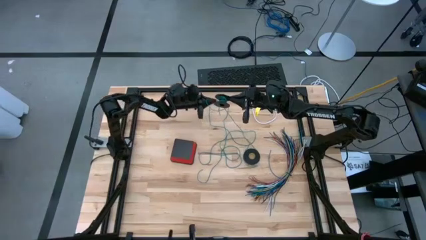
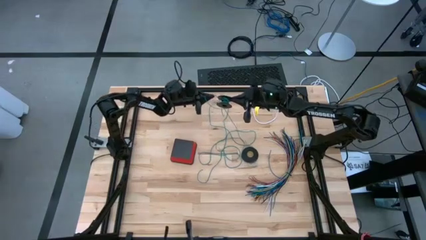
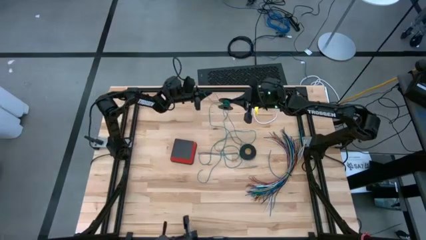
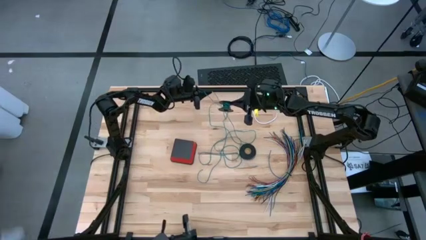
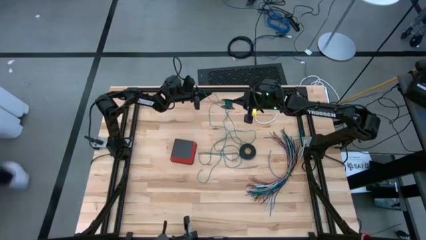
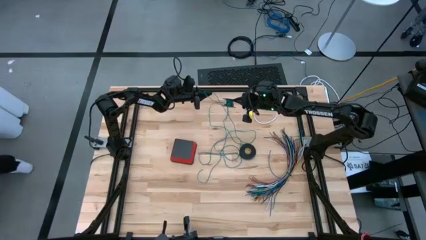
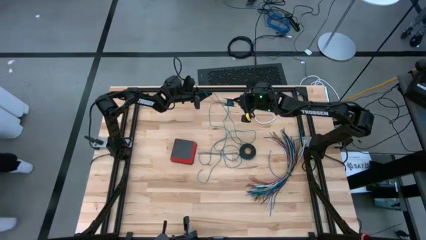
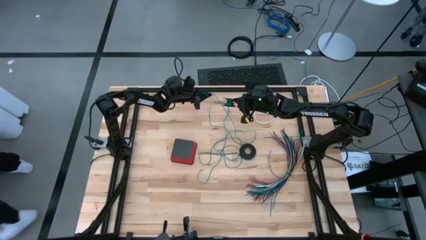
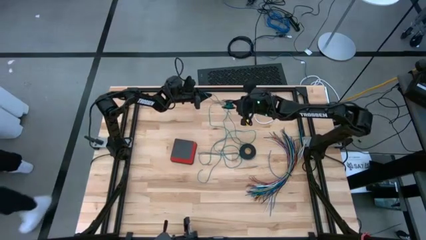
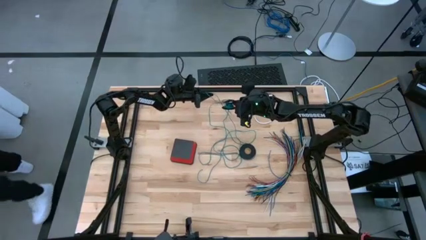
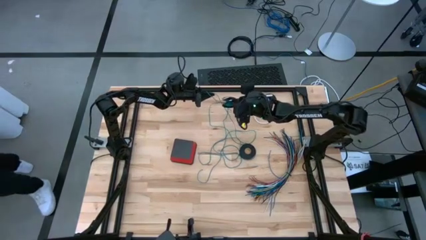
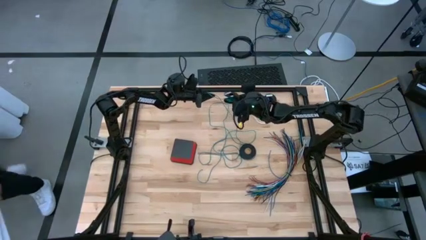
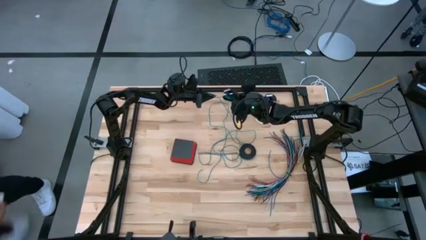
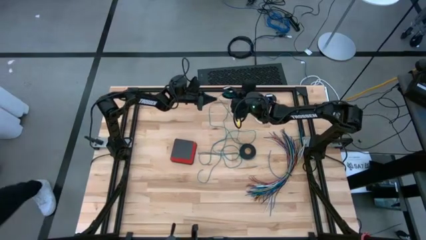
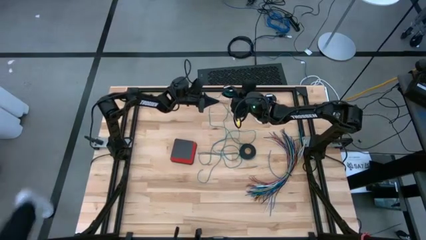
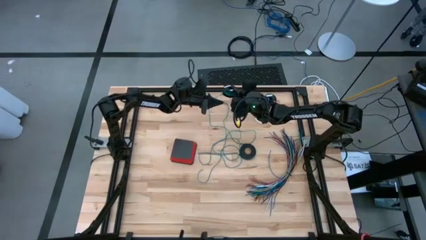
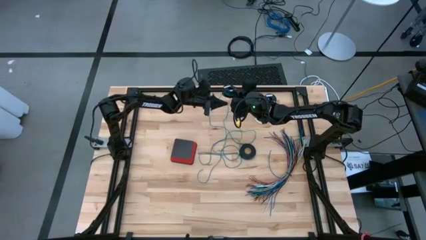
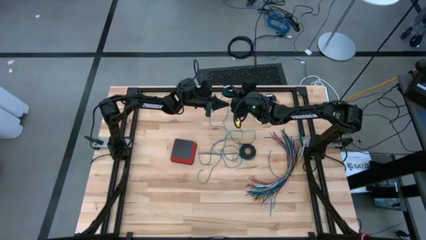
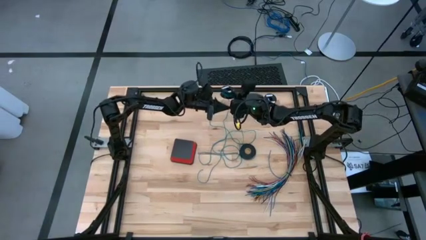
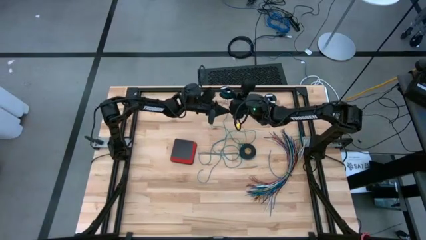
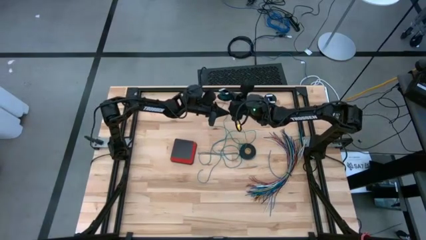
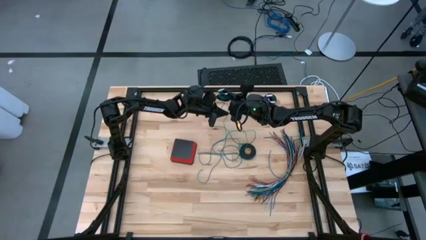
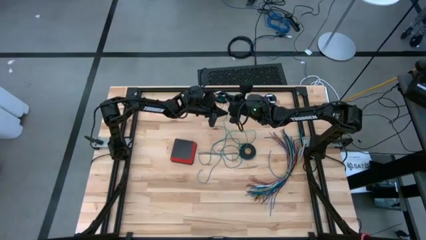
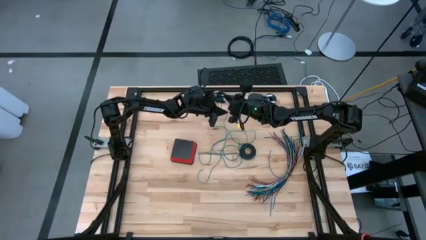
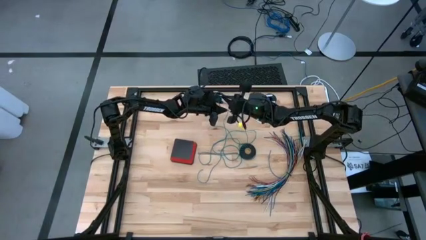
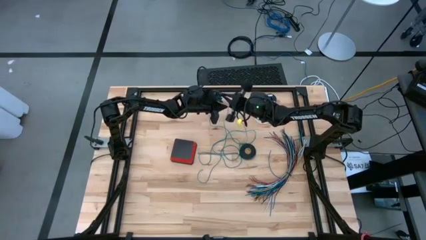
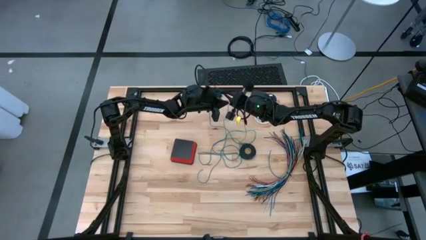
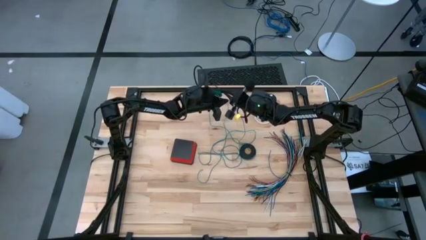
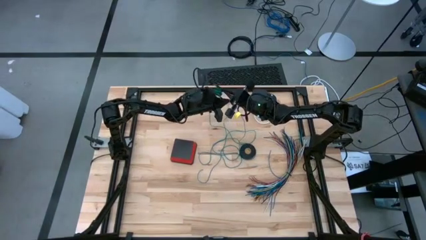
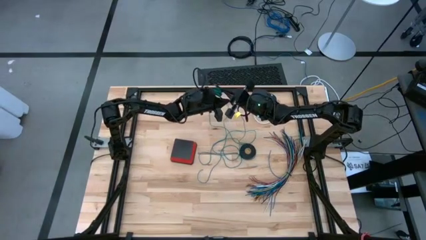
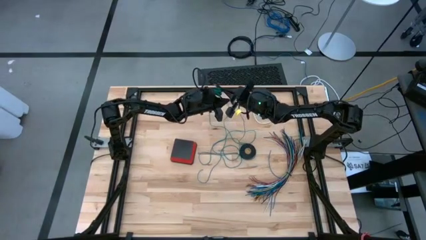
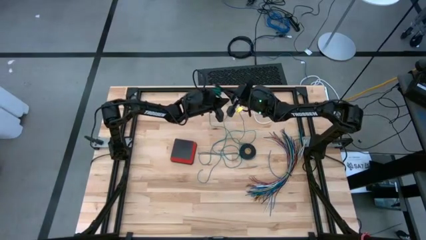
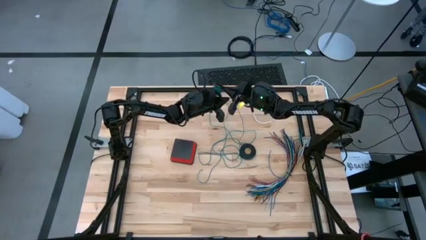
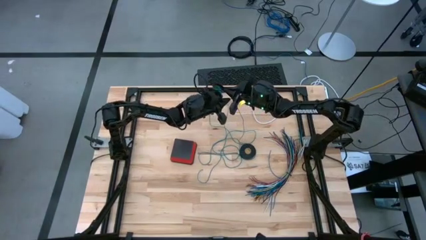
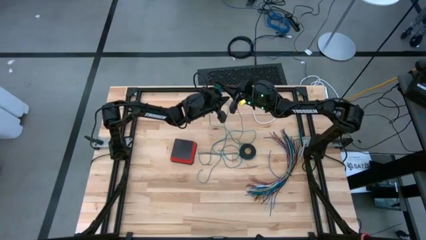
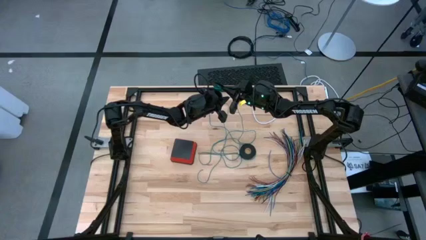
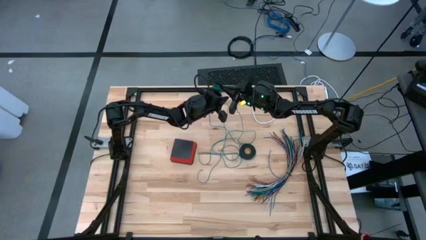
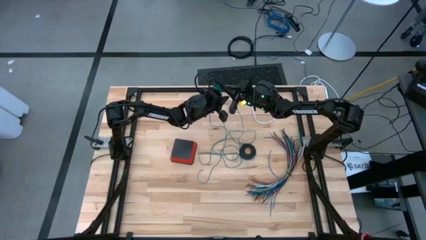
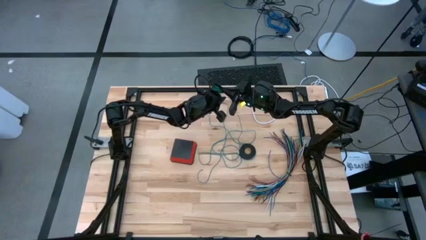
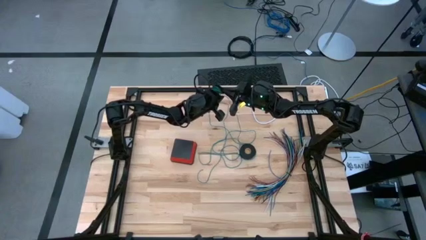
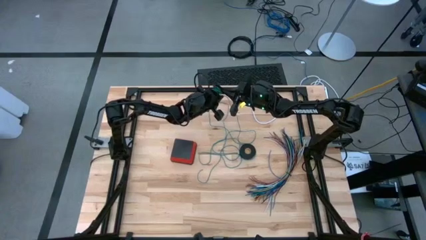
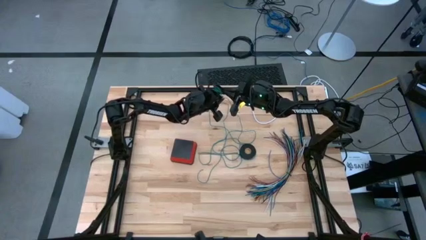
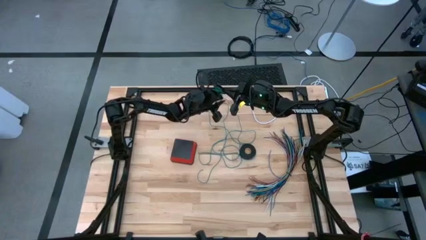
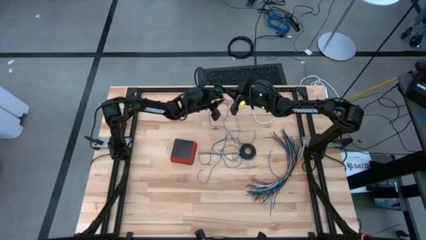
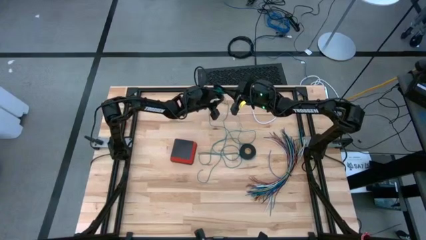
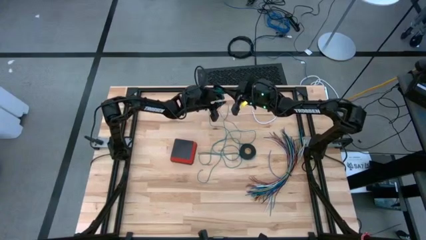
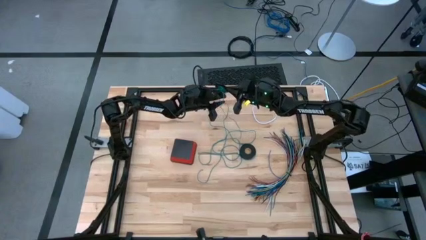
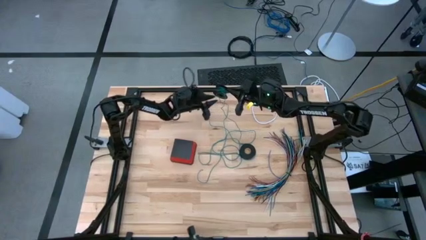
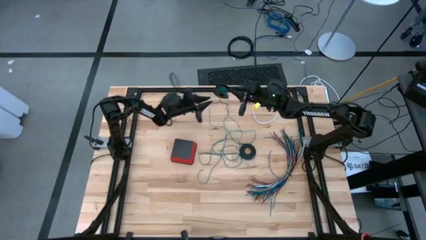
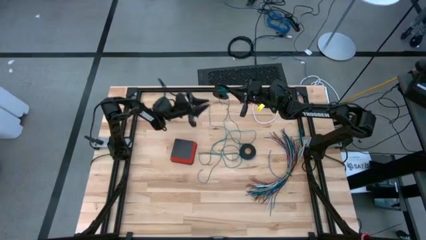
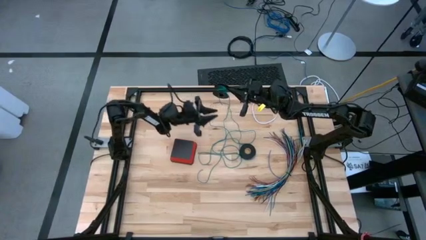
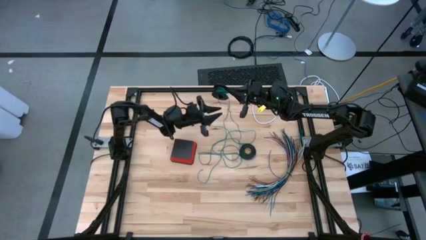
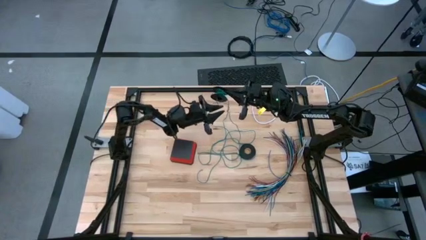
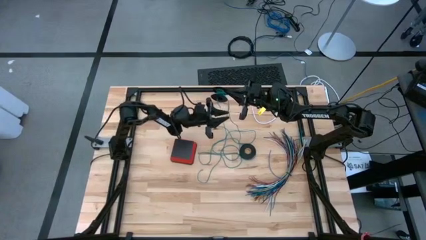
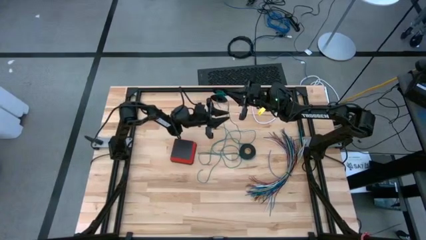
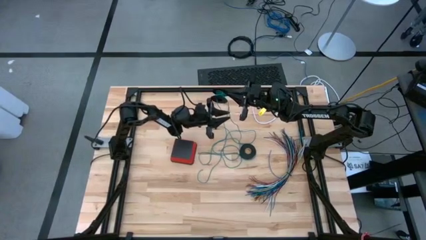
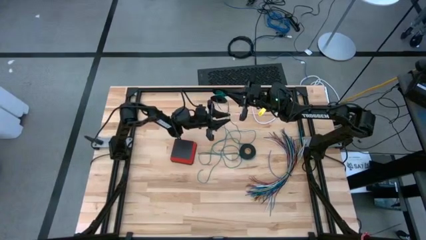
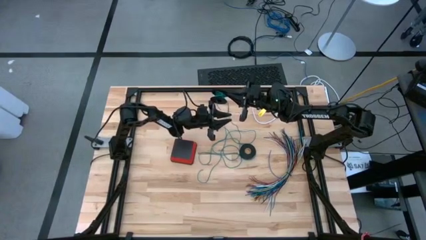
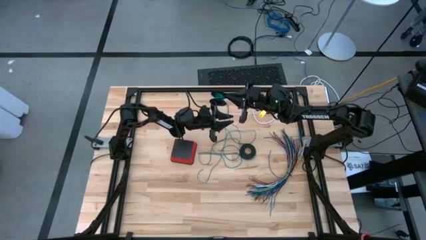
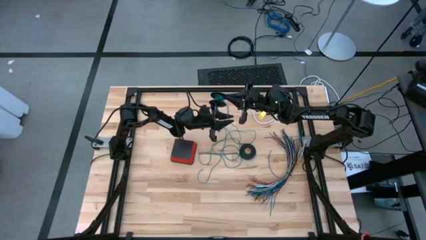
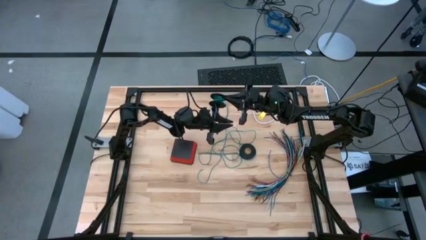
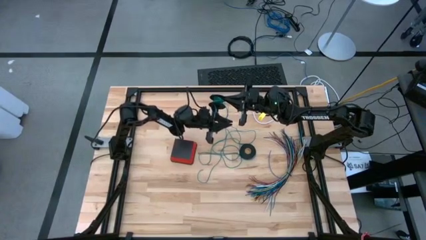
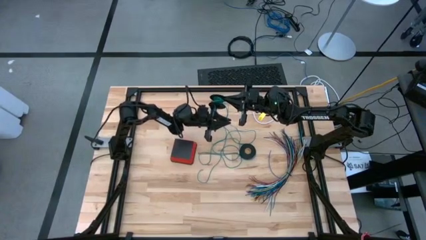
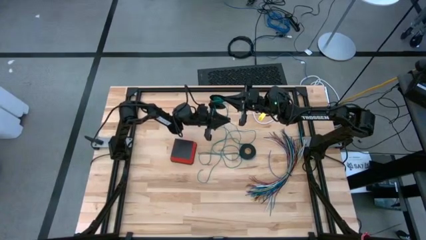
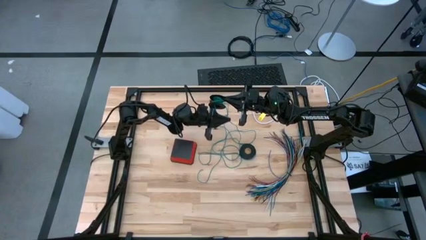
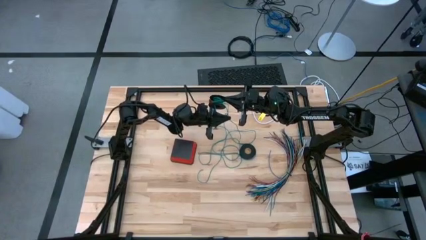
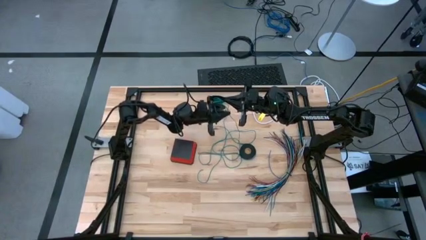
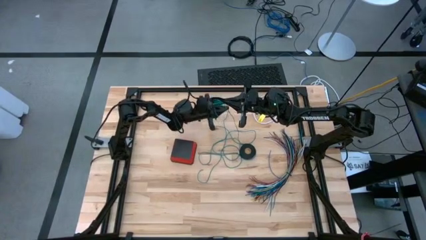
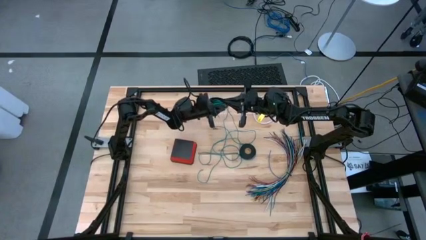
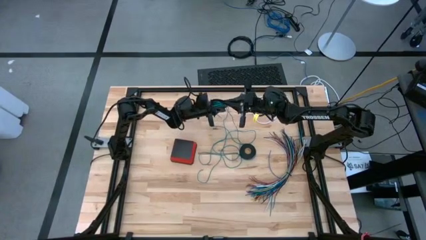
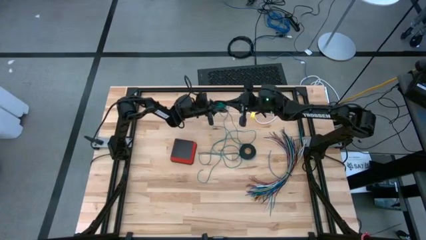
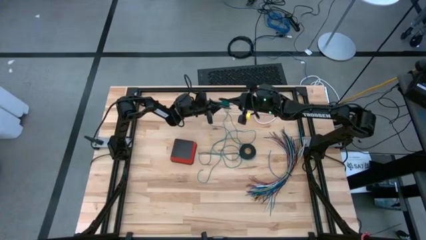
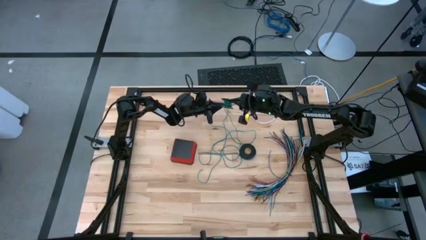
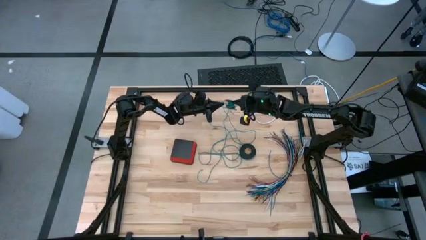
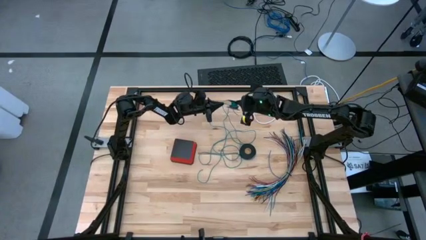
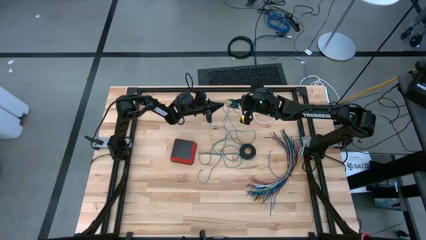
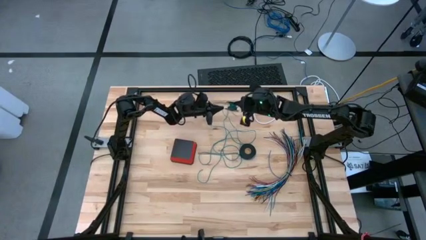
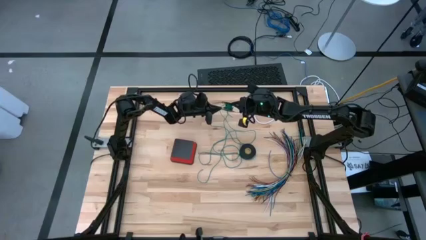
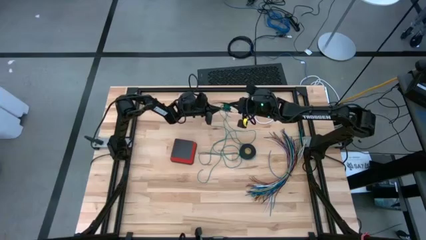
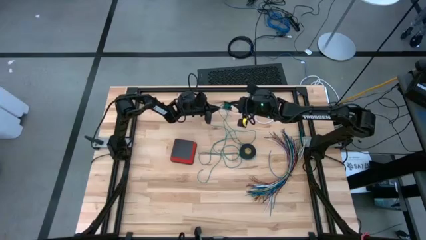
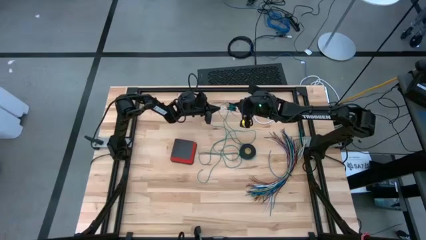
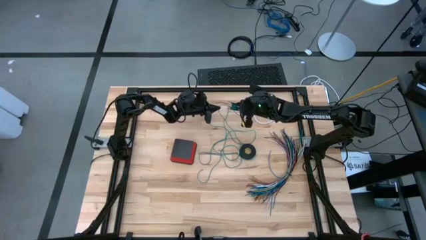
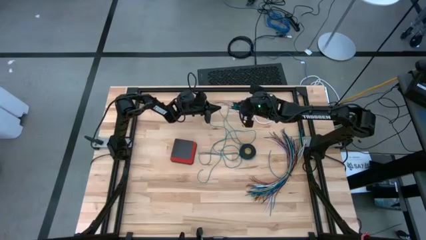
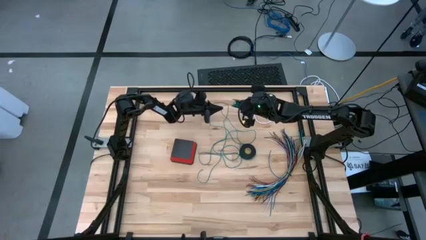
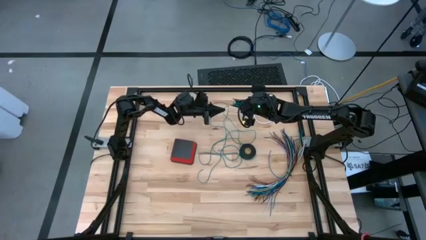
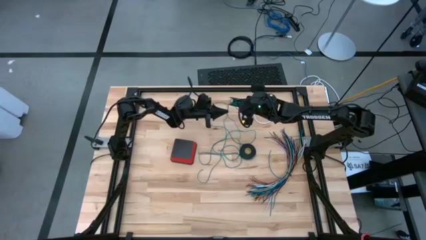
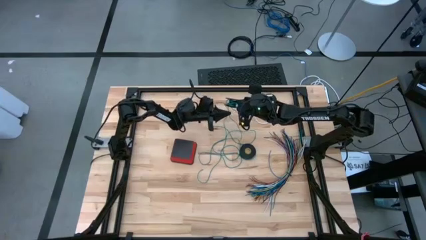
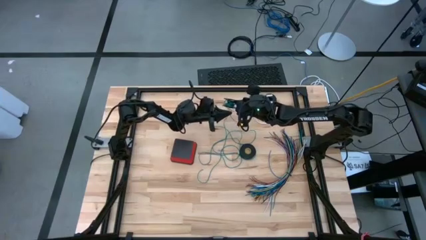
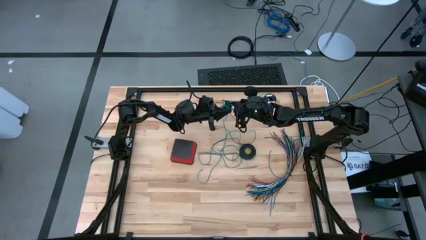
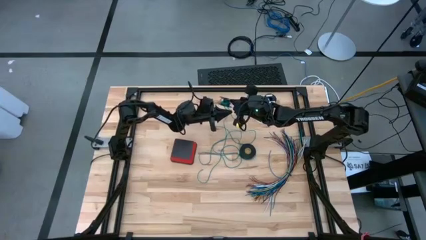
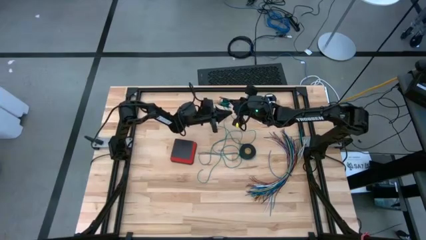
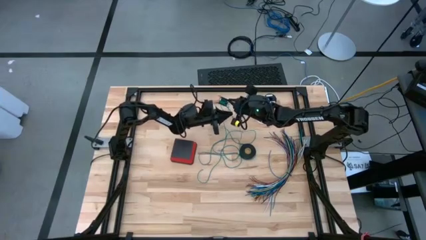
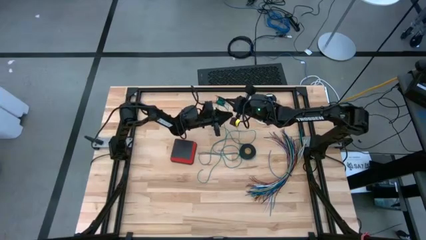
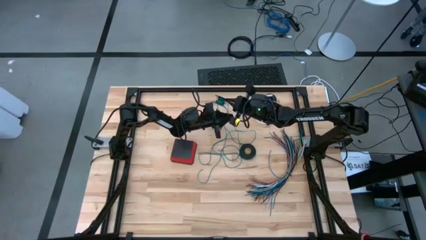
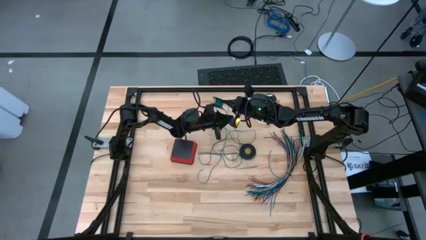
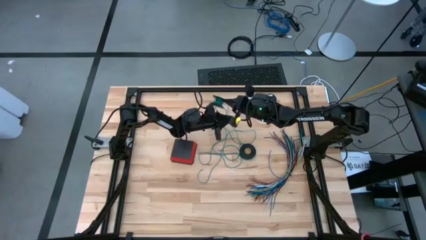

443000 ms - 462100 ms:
Task: Coiling cords
Coil the green wire cable on the spool
